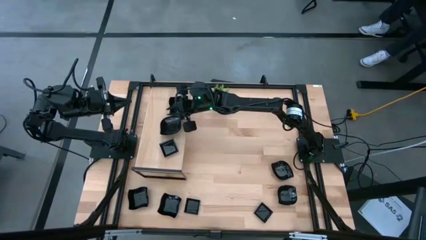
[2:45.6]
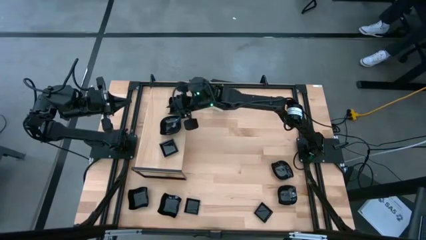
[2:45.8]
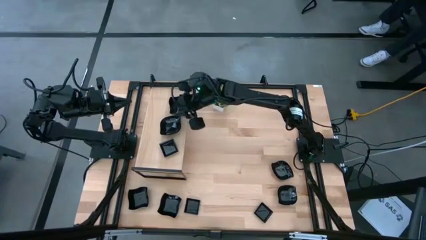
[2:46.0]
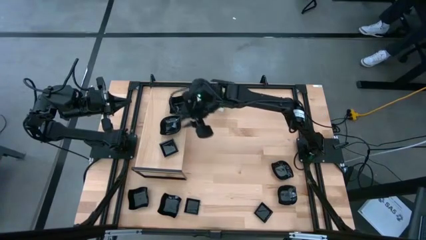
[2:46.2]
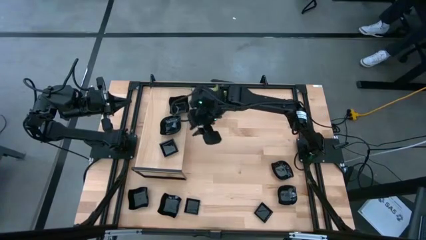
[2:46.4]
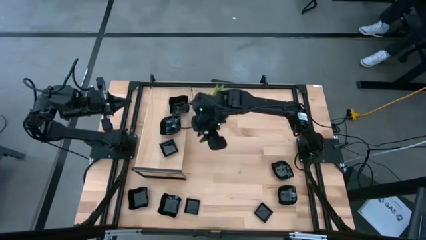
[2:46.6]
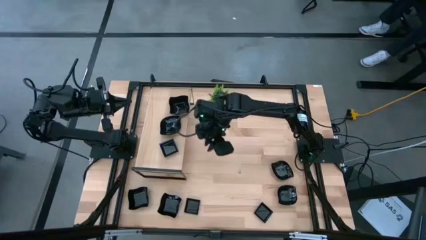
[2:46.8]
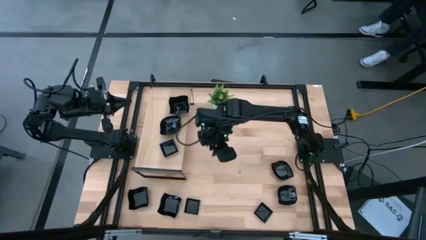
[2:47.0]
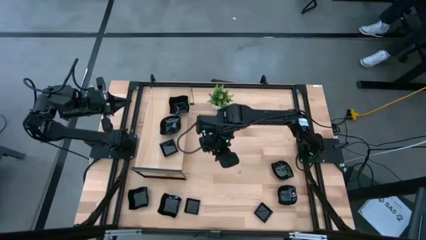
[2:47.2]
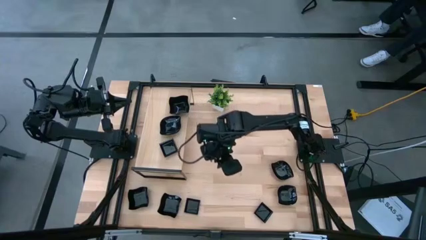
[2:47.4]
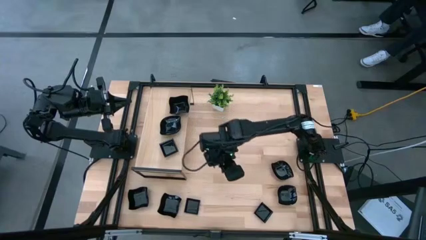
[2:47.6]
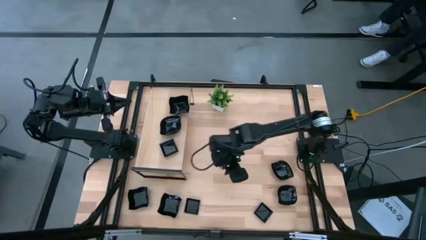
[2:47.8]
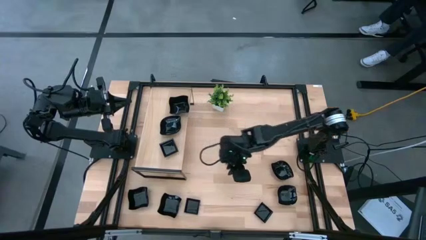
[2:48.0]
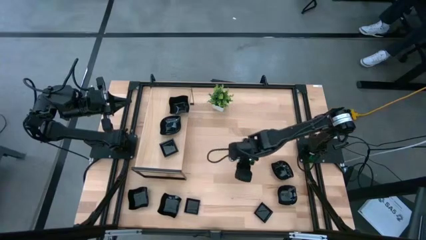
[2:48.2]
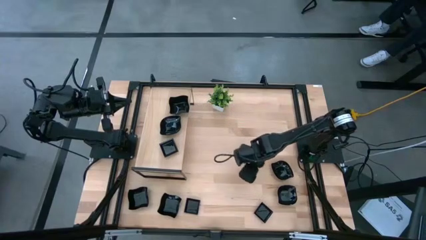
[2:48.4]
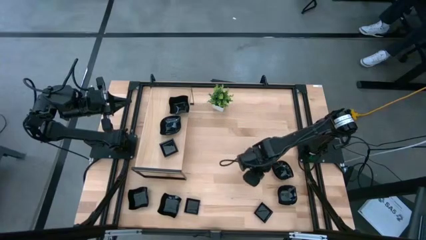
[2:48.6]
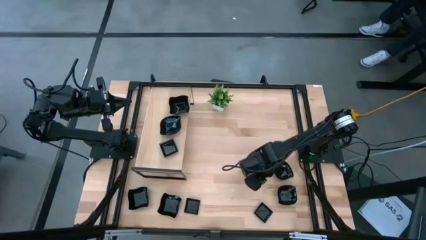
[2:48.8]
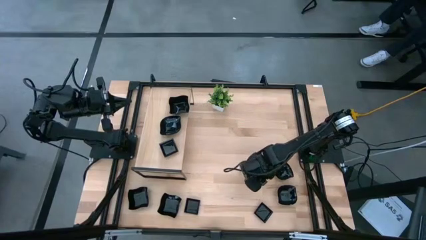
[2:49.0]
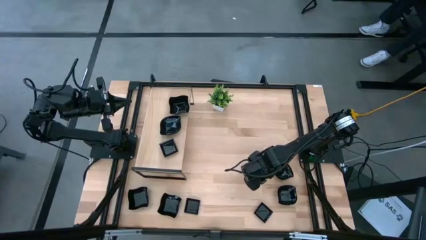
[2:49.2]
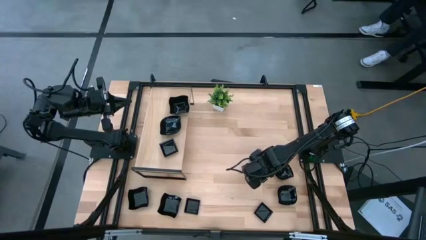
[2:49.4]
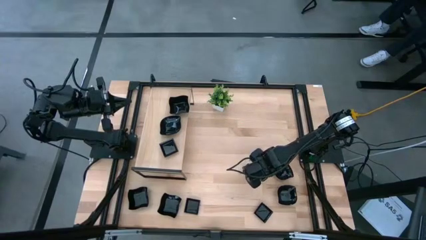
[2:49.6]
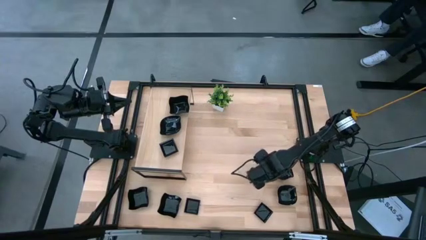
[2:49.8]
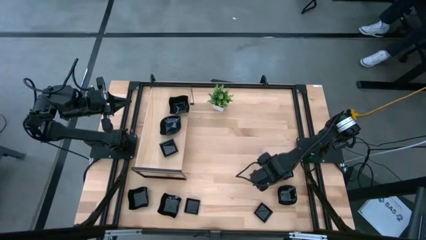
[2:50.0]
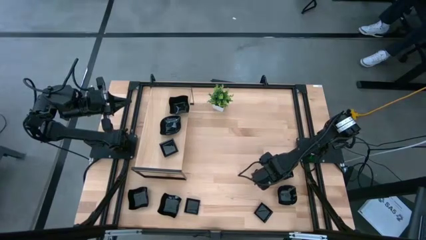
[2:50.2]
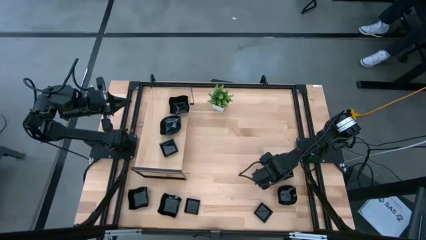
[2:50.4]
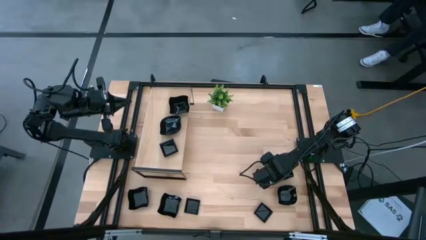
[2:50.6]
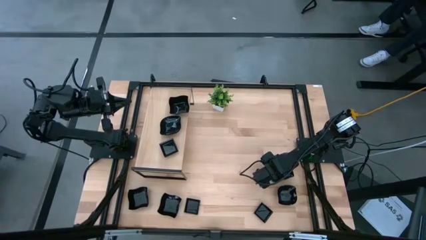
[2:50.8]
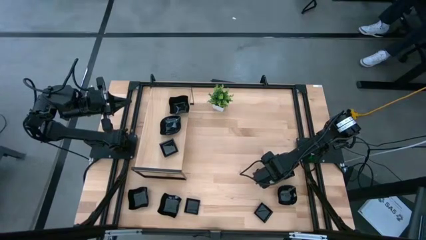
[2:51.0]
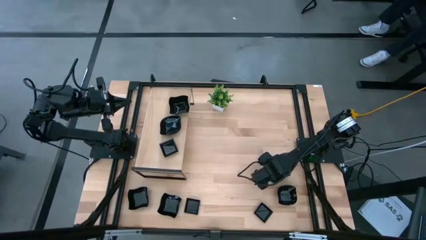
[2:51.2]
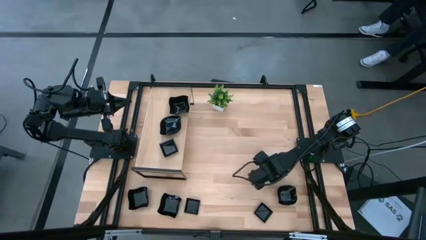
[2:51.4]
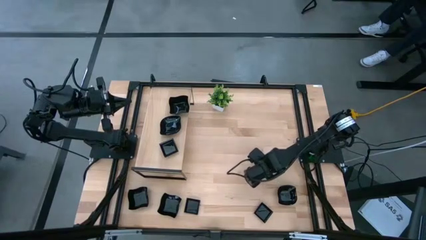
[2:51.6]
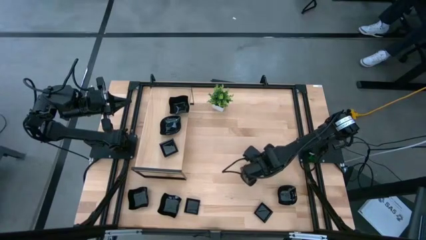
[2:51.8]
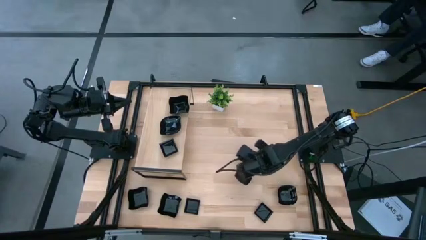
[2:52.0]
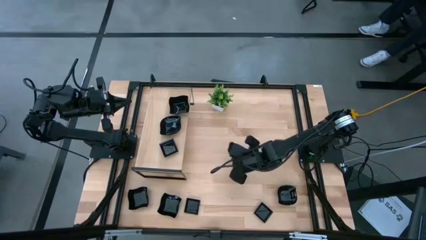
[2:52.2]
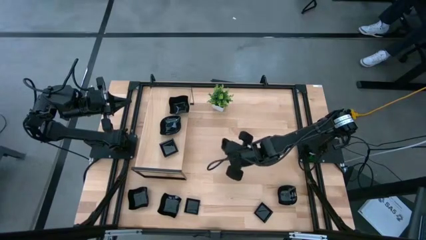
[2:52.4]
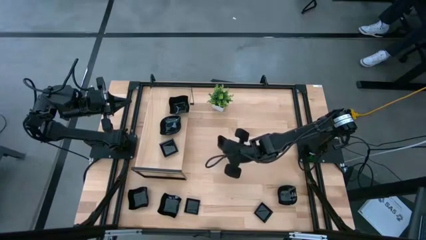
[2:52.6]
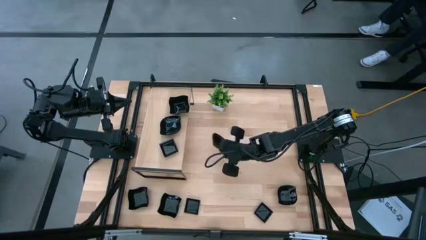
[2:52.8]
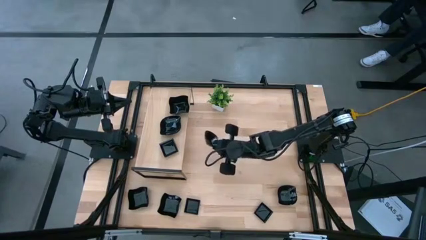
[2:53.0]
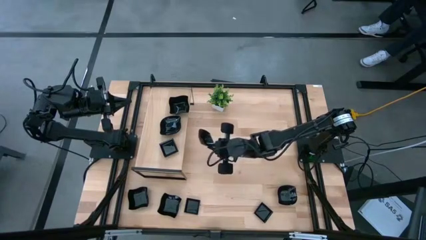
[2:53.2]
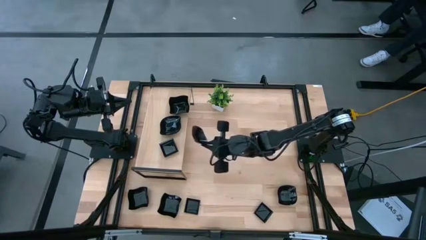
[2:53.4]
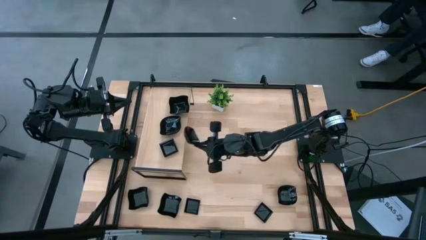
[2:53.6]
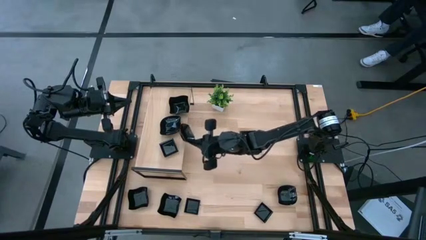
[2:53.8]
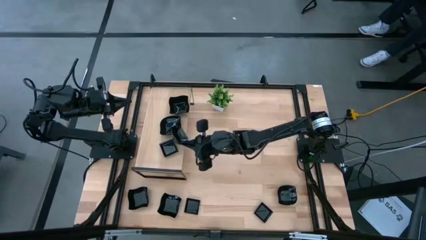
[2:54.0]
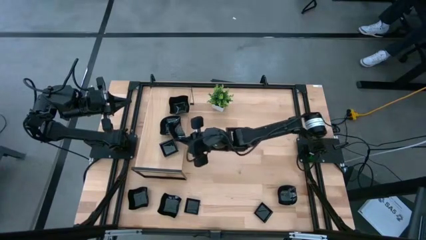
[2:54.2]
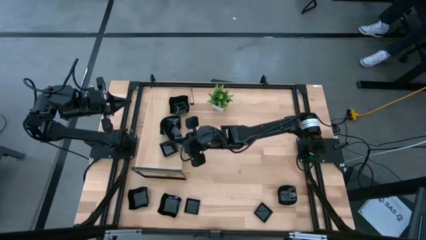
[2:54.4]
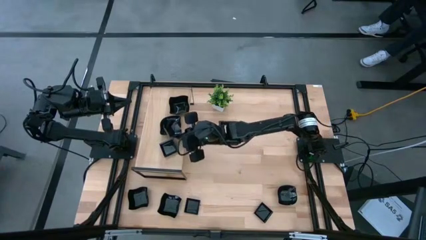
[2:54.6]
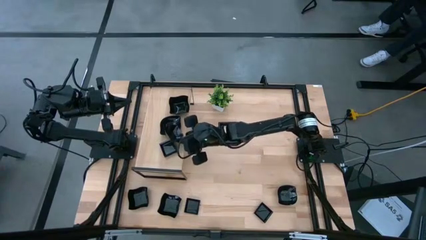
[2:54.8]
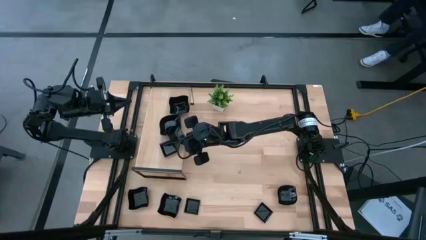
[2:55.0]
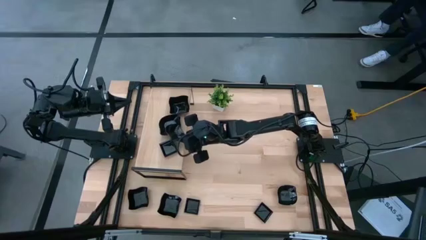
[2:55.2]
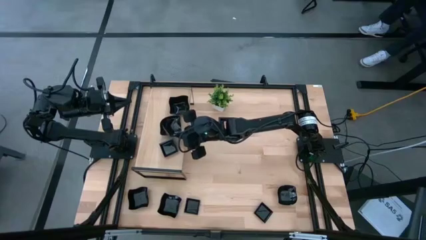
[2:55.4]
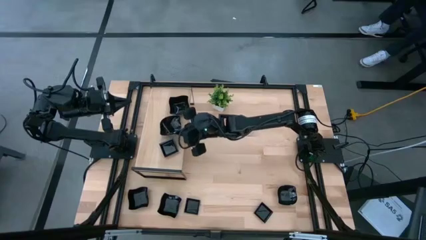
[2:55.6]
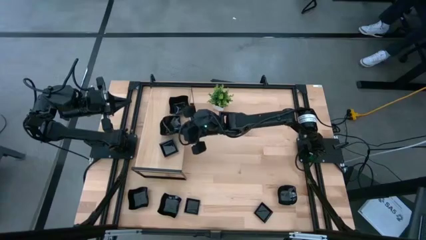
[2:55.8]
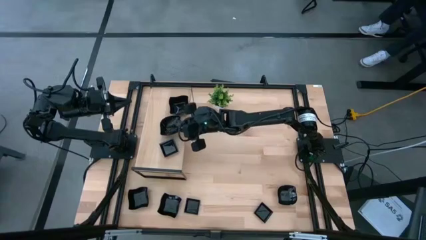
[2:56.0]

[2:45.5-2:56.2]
Task: Pick & Place Mini shaped plates
Stack the black leaf shape bowl on top of the black leaf shape bowl on the shelf

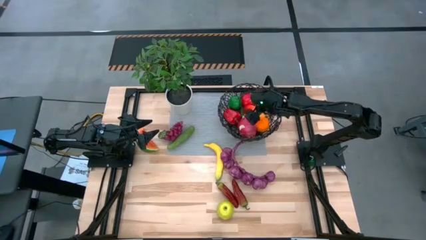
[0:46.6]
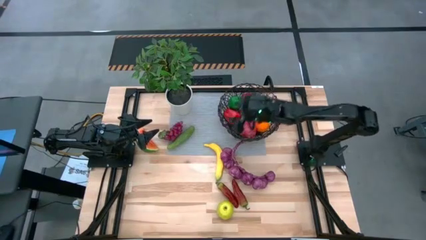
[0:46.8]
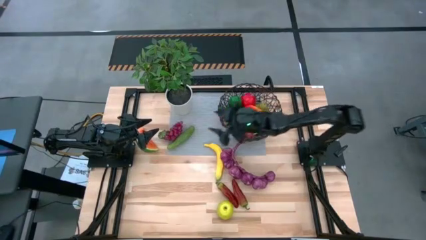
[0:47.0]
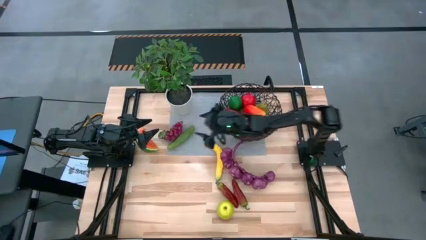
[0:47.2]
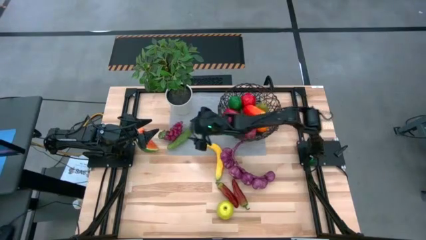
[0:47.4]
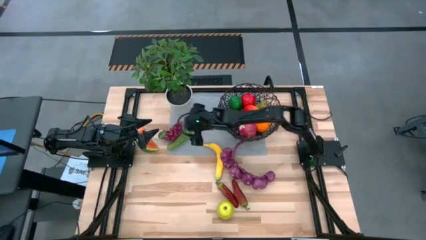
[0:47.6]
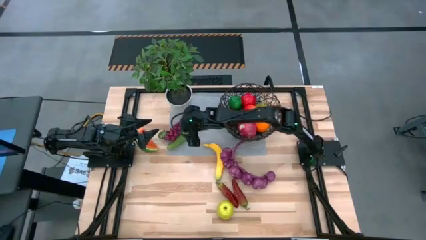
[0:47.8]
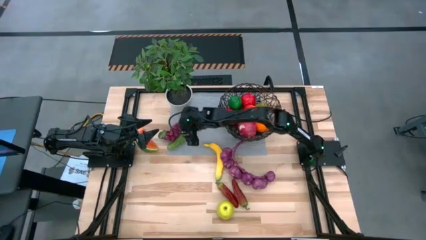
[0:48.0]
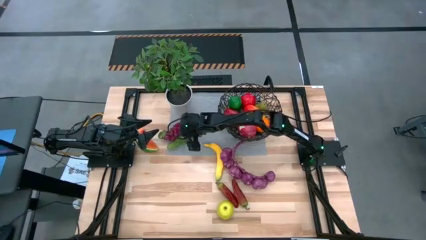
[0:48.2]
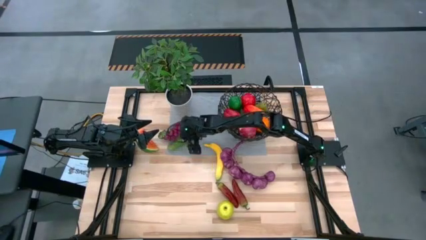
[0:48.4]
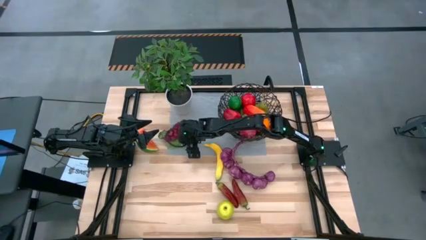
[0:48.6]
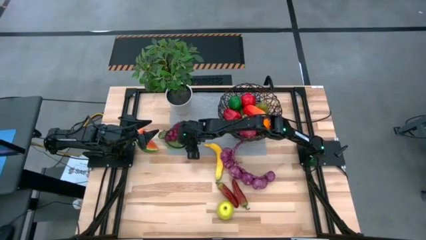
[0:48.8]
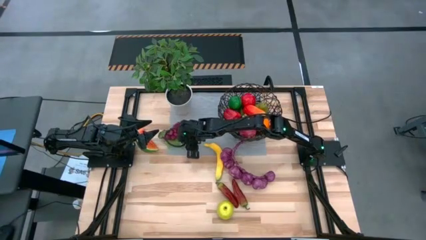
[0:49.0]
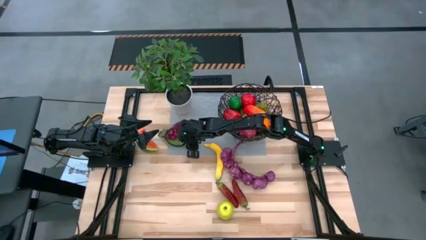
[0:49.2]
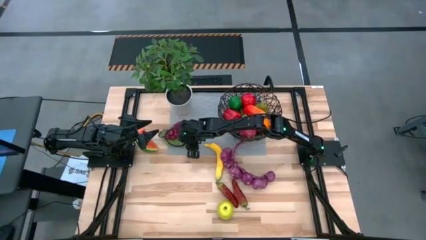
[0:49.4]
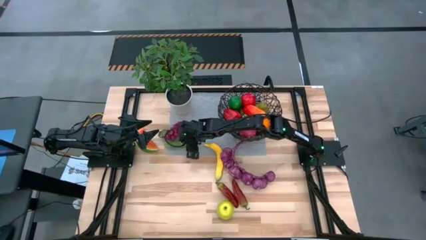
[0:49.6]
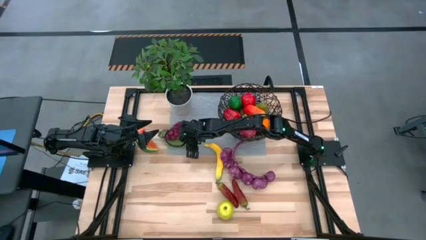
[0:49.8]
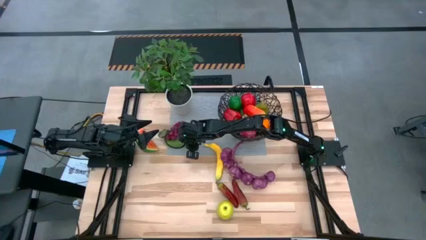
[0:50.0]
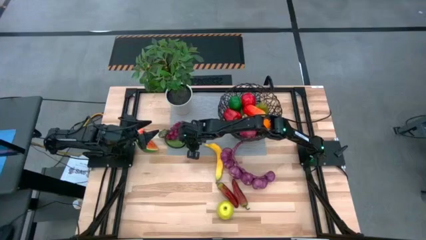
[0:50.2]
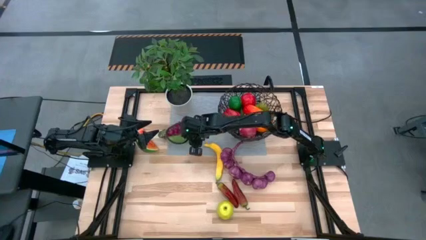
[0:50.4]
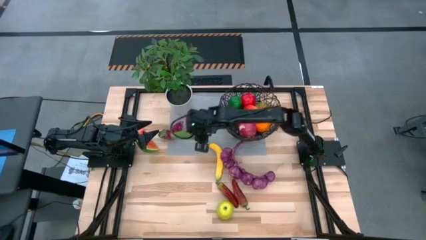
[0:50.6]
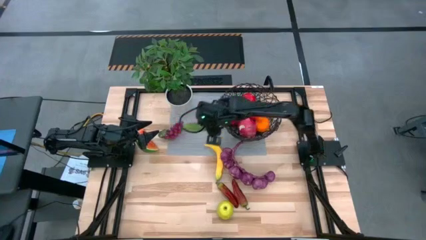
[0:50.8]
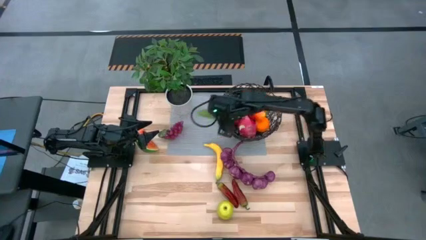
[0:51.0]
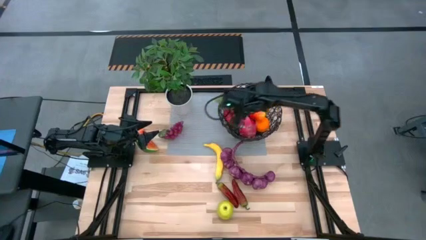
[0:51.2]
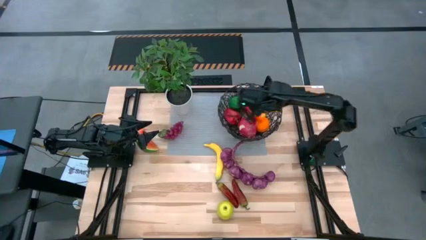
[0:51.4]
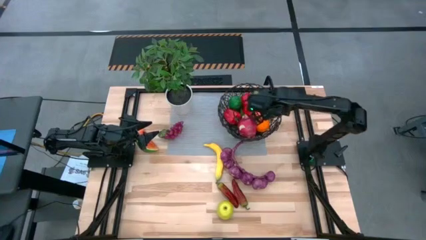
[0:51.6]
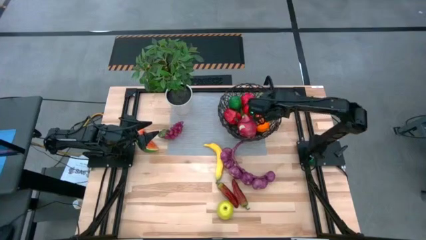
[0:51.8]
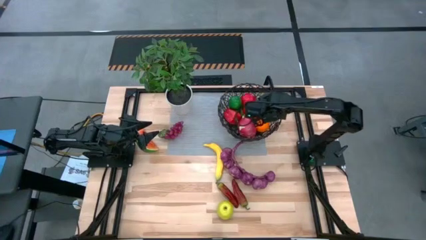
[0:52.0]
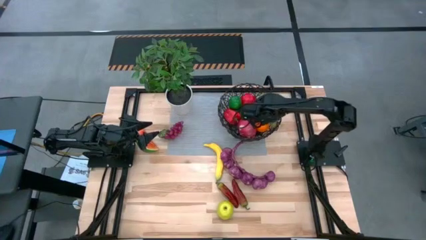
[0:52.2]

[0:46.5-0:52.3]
Task: Build produce basket
Put the cucumber into the wire basket

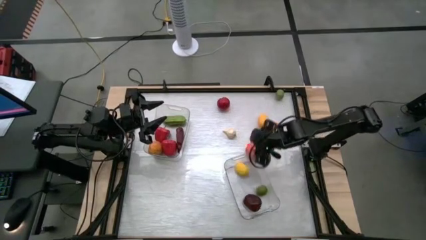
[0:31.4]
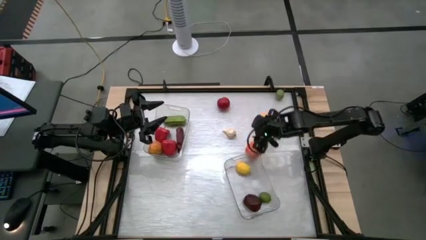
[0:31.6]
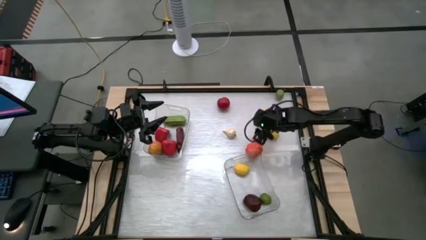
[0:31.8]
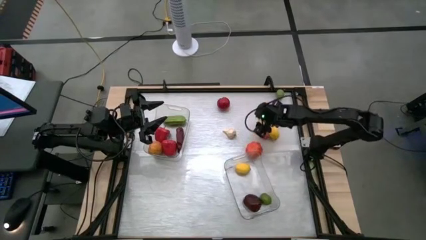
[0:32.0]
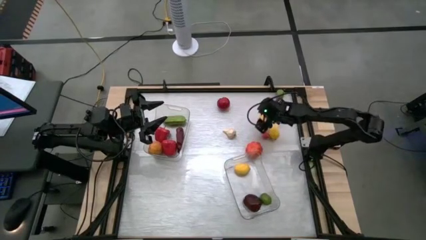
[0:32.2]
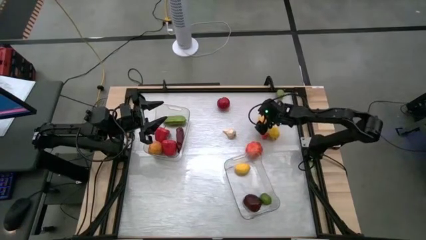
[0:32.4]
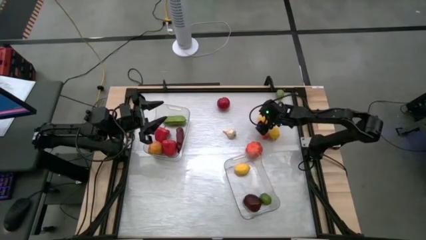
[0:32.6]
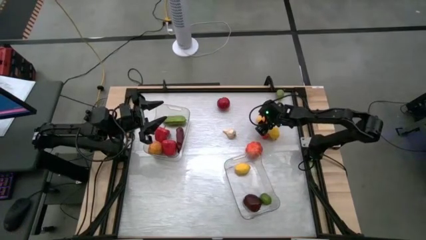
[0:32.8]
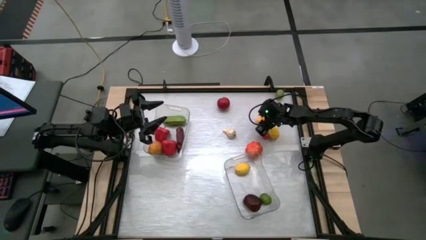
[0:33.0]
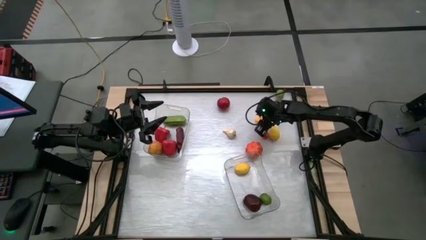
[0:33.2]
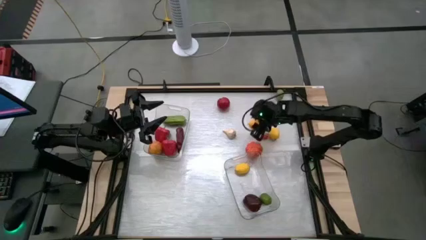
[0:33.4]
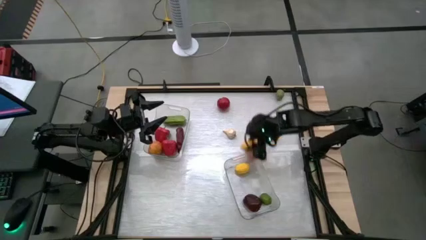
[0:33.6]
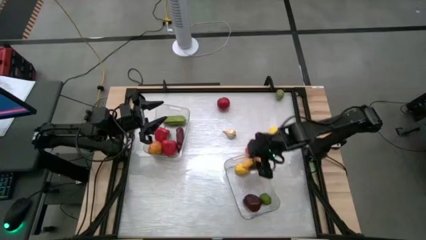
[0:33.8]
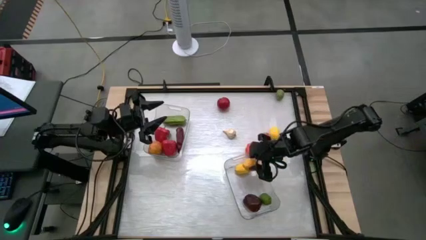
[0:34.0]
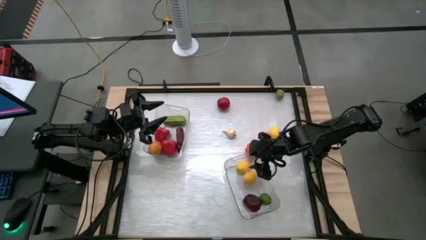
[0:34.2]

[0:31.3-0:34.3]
Task: Sort produce into baskets
Put the top yellow lemon into the right transparent bin
